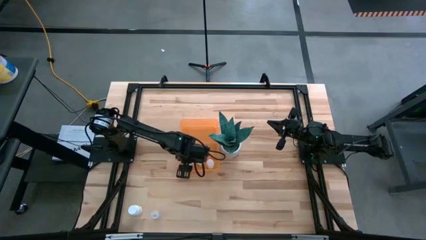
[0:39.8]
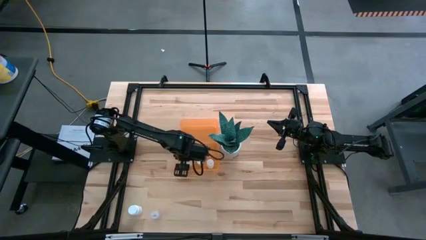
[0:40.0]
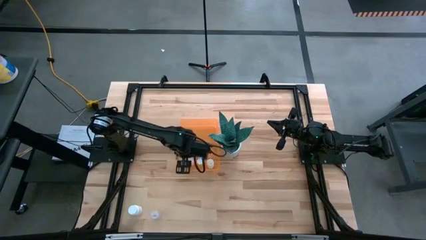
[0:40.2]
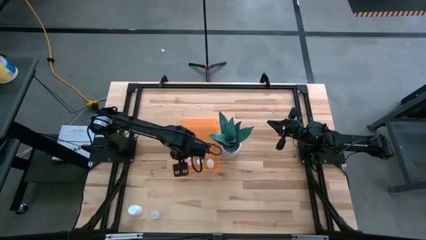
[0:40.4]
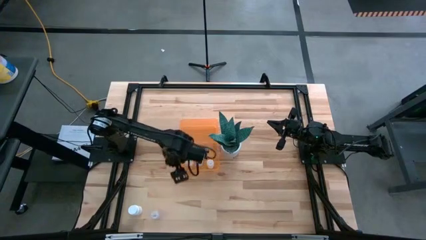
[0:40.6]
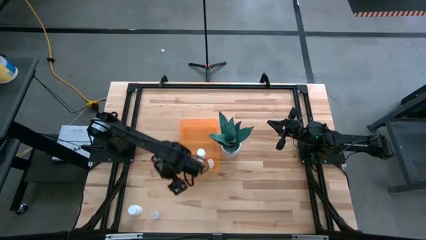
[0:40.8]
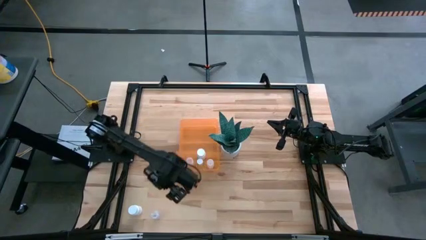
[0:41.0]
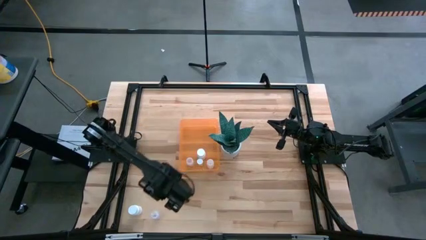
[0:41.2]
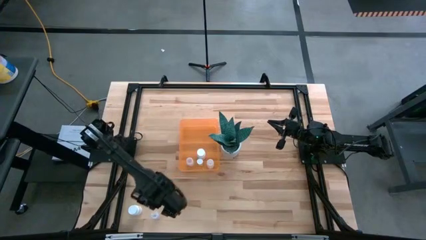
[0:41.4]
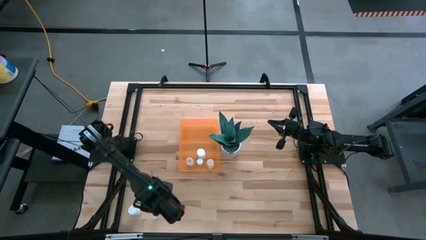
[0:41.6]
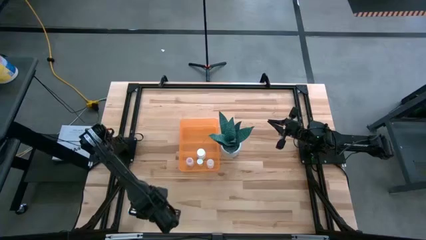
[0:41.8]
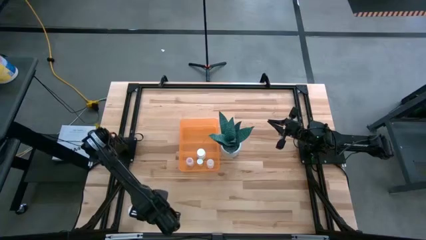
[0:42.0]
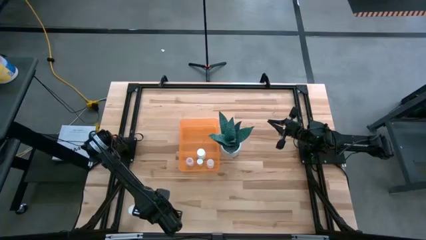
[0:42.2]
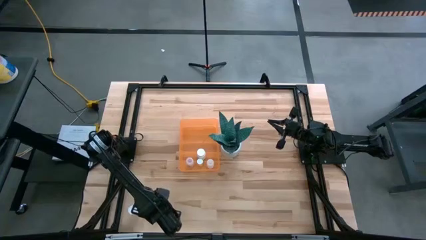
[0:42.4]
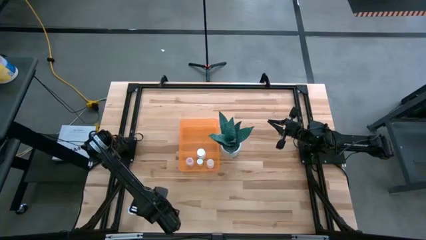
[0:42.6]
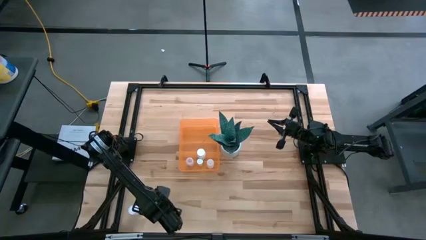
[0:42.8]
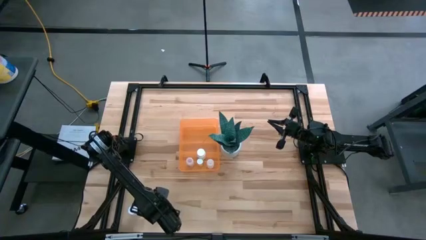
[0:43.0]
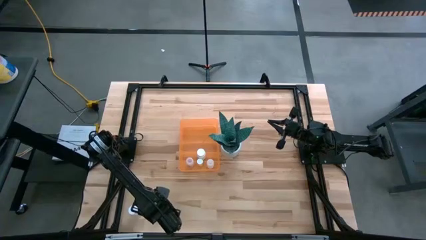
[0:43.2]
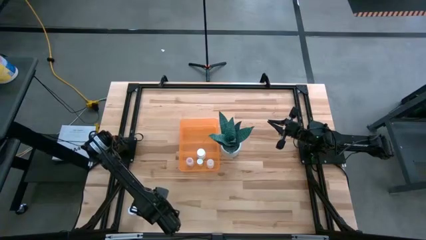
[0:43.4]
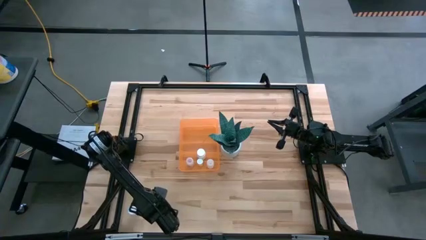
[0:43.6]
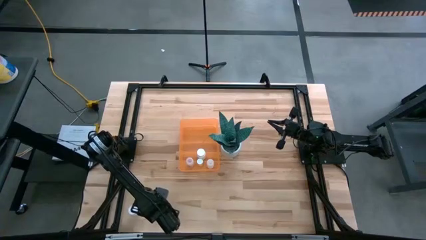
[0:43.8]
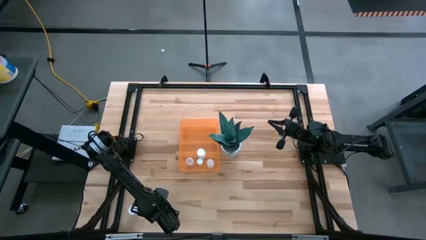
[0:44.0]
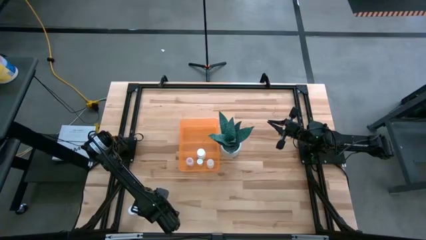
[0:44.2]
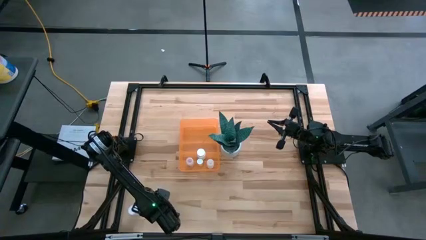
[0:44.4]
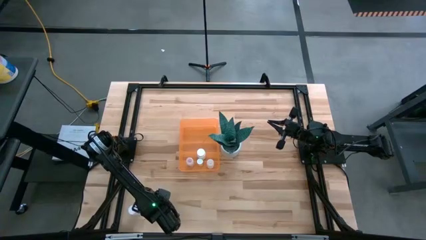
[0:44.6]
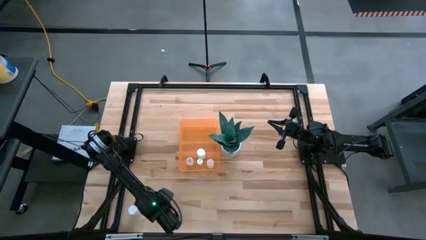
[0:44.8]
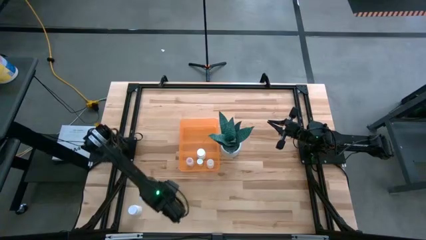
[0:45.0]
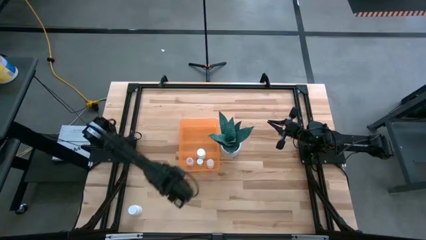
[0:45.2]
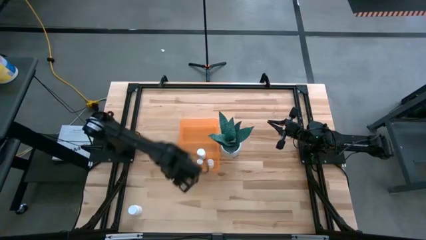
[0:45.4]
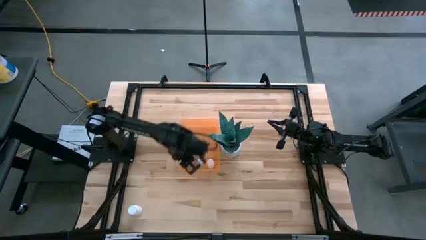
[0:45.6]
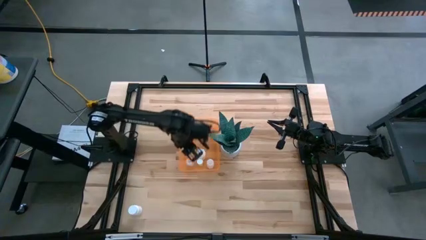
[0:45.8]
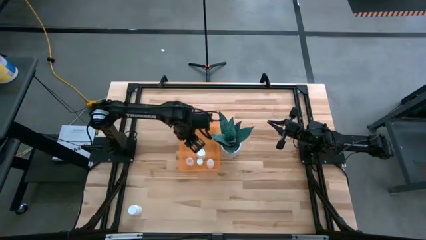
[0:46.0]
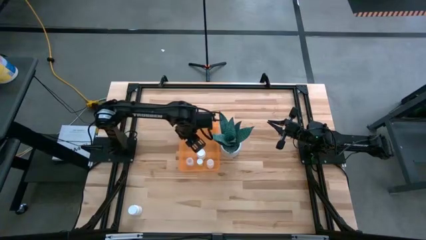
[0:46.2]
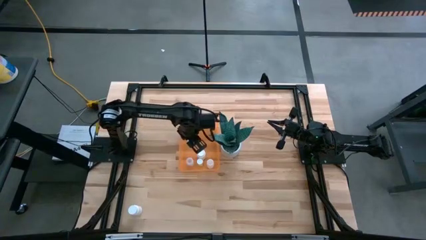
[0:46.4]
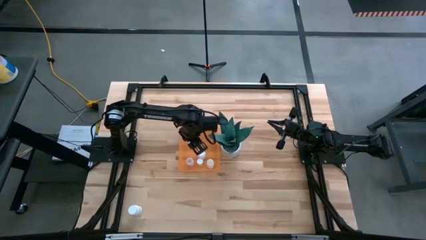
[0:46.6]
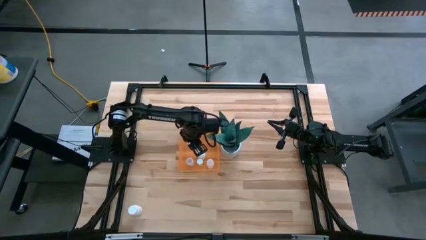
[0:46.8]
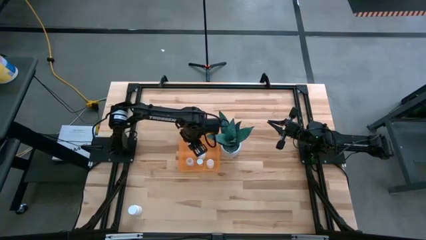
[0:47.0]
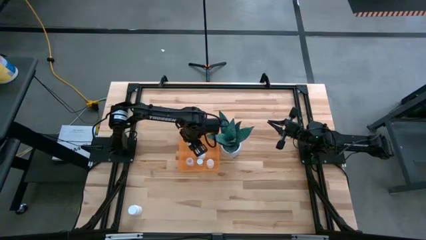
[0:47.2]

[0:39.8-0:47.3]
Task: Pick and place pill bottles into a basket
Put the transparent pill bottle into the orange container

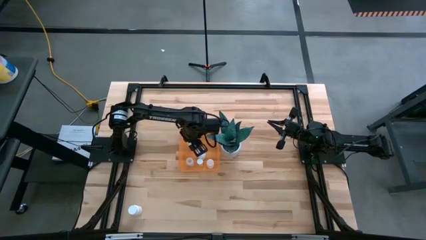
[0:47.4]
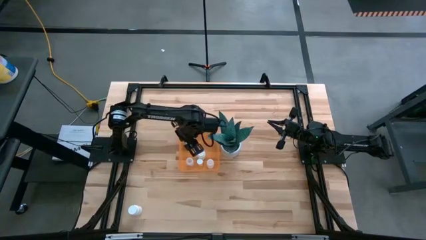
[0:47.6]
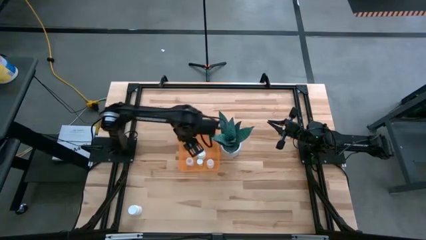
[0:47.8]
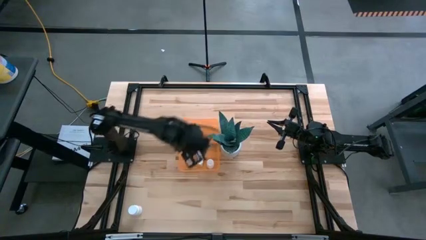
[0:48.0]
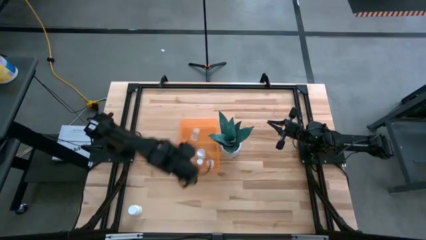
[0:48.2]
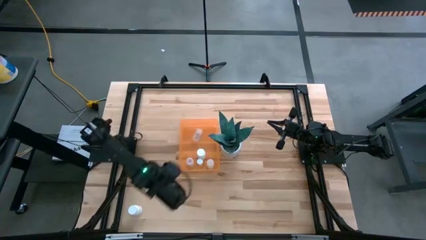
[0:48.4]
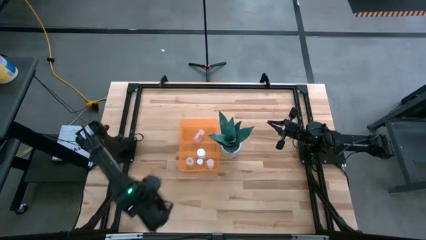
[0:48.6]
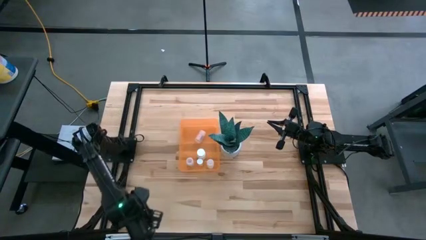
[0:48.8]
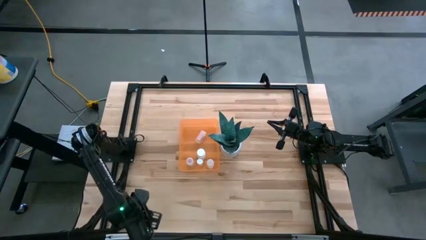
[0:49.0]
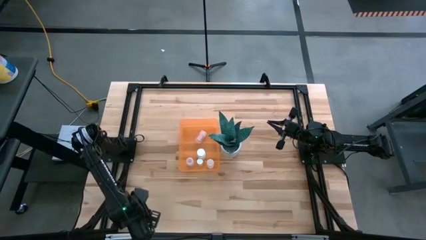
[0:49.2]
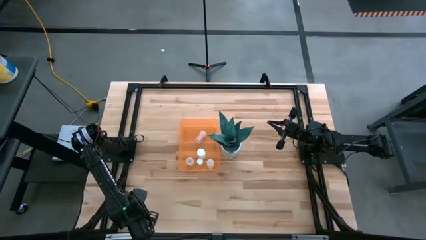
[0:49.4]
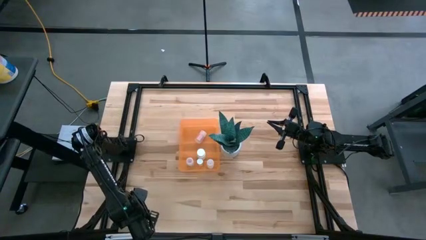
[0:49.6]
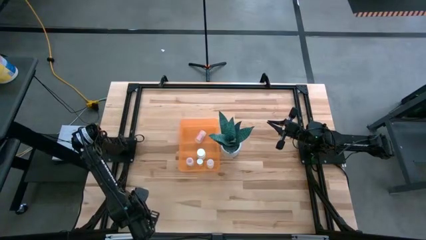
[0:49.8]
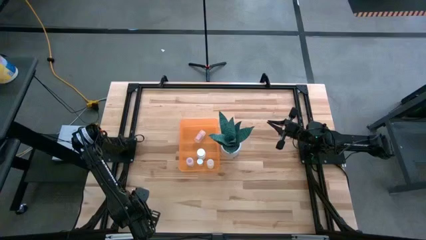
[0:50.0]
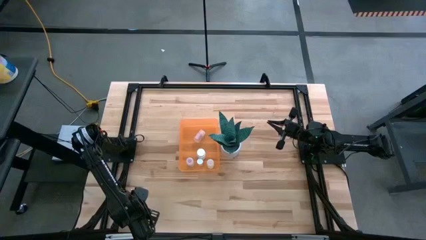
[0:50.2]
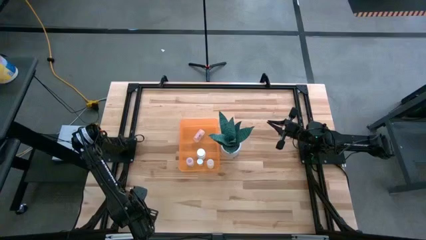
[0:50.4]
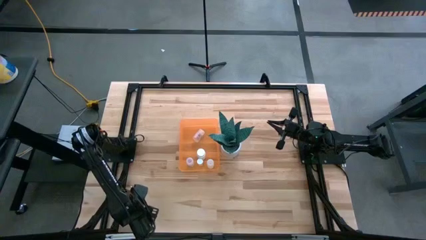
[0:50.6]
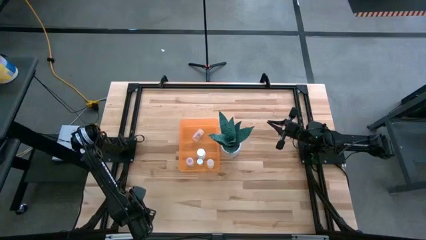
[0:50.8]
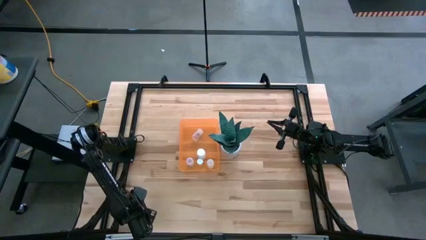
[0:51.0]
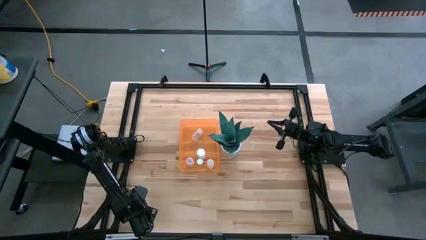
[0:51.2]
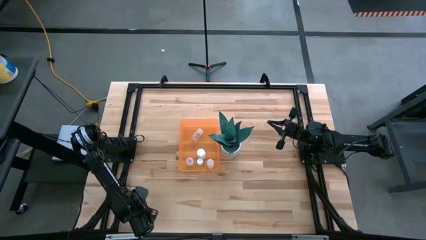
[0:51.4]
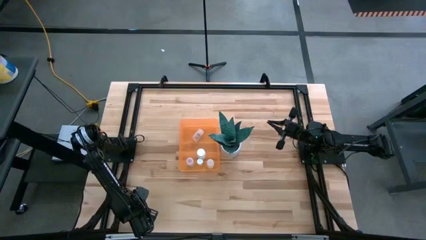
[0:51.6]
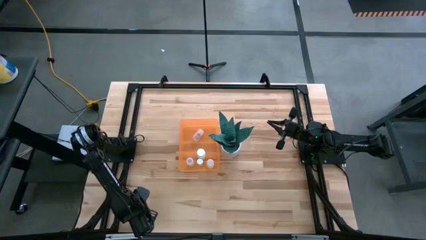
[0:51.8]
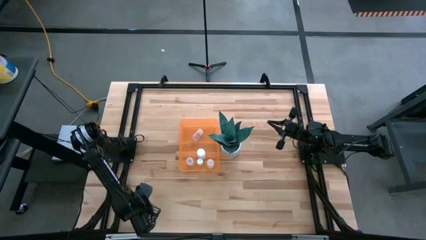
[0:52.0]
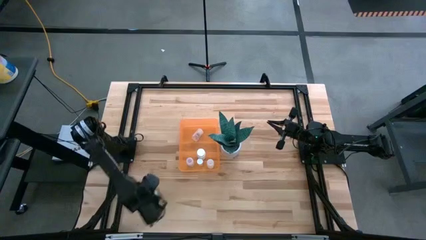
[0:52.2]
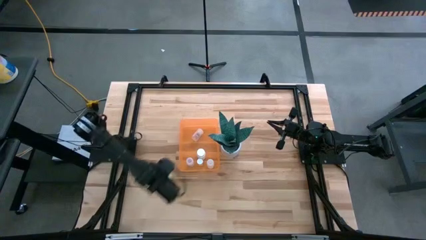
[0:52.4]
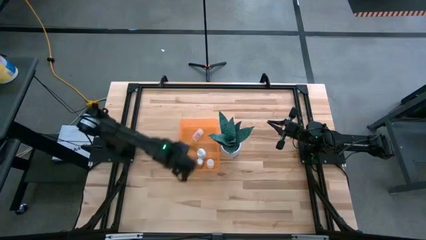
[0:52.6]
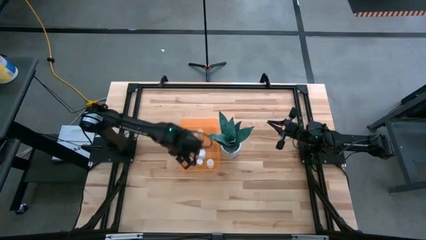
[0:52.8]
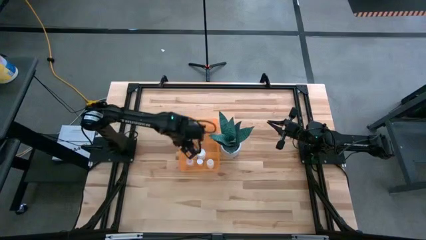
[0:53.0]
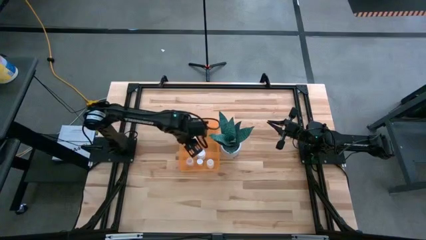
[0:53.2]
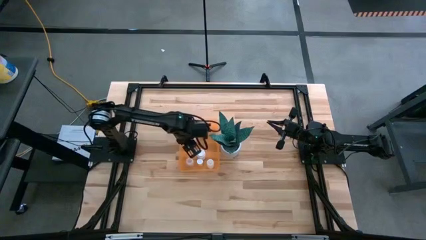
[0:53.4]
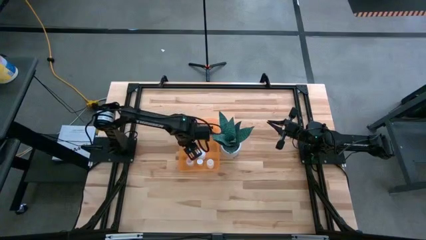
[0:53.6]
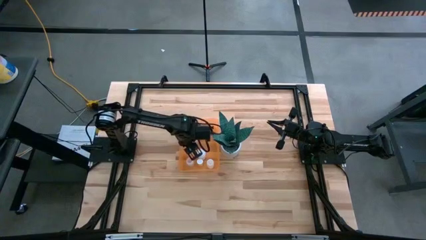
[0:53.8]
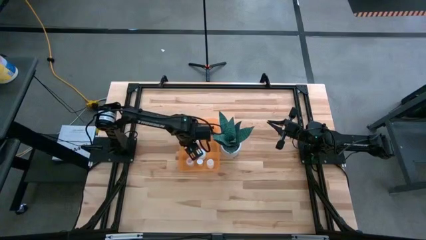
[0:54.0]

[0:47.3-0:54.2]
Put the white pill bottle into the orange container

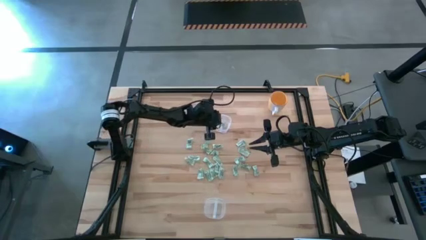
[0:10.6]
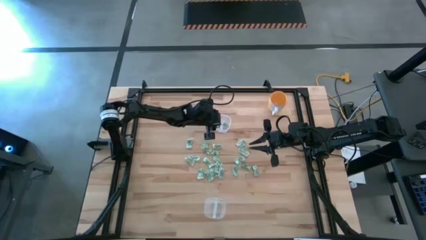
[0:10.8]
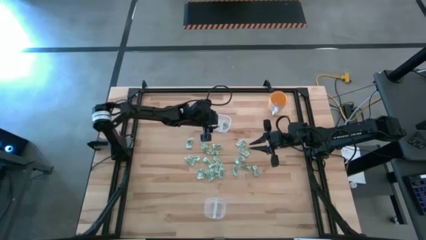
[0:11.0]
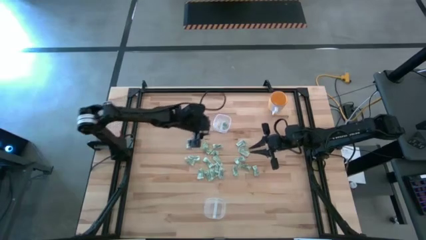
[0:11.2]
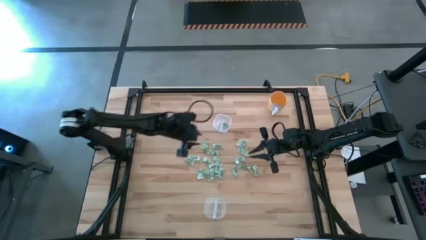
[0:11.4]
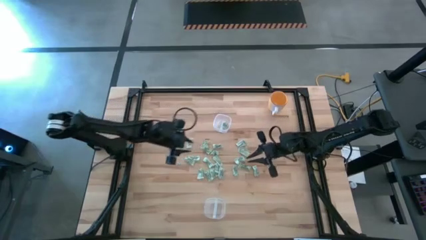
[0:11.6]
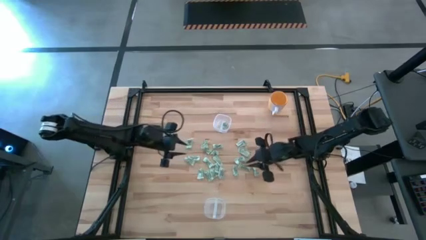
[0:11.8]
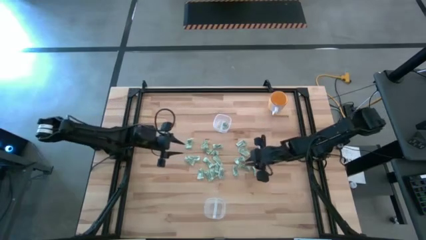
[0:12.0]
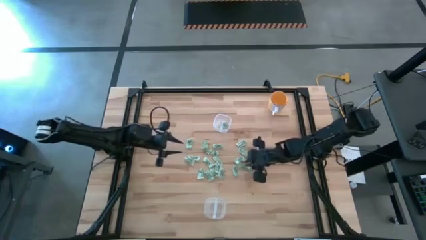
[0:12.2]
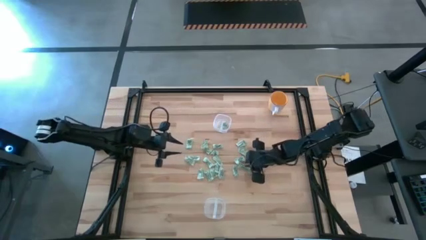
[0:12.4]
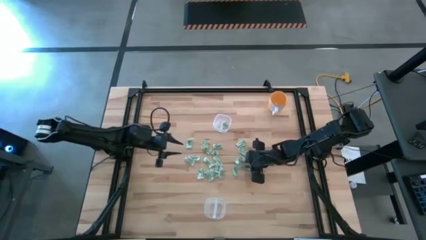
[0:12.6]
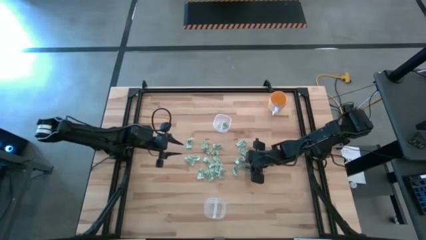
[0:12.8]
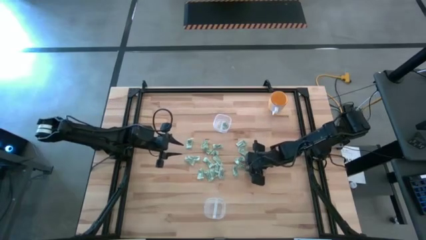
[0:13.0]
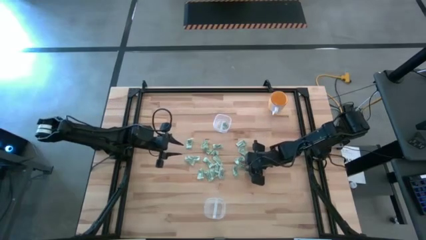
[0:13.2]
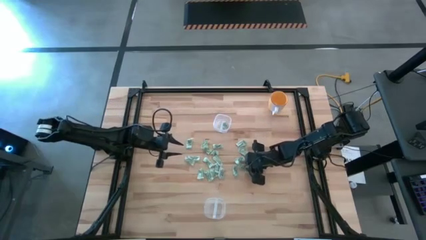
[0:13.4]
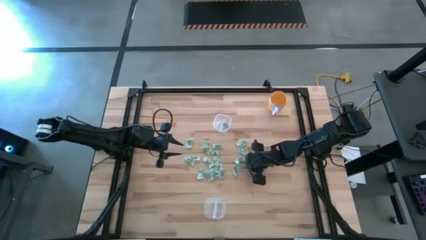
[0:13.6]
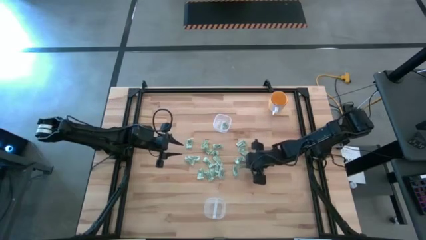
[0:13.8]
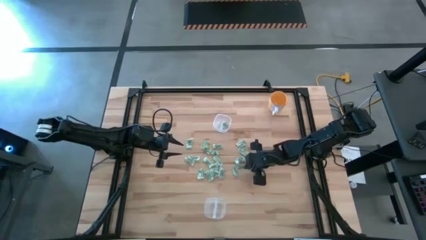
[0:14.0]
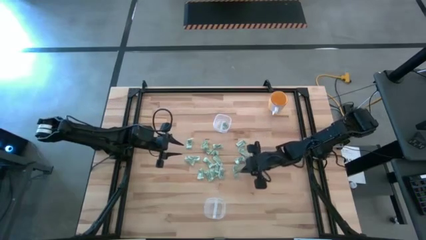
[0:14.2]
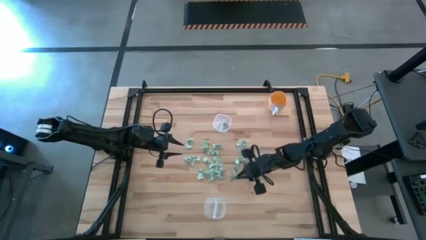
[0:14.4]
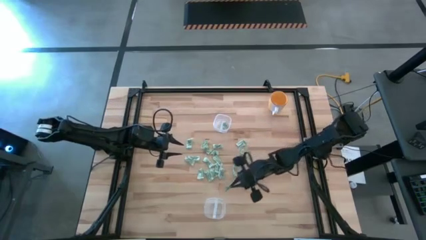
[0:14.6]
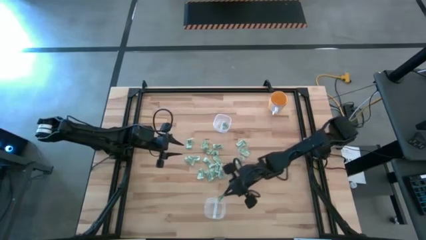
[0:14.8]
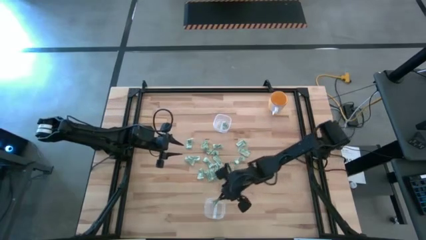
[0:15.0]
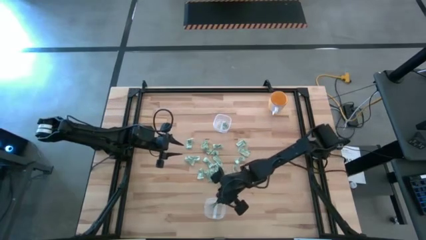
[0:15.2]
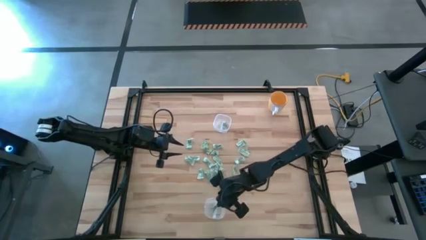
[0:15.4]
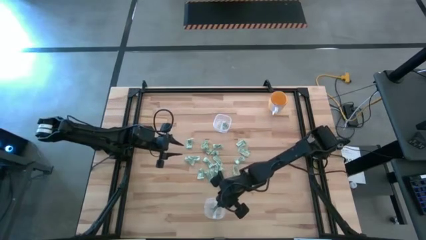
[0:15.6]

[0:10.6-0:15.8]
Task: Pick and place items into bin
Put the stevia packet into the bottom transparent bin
